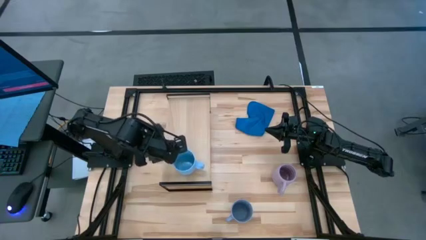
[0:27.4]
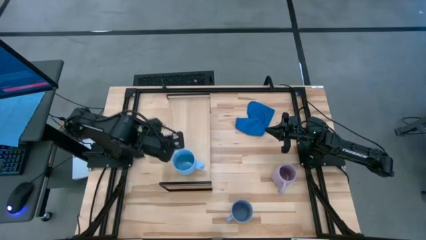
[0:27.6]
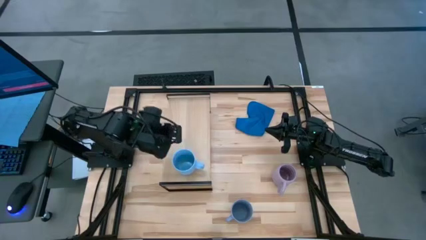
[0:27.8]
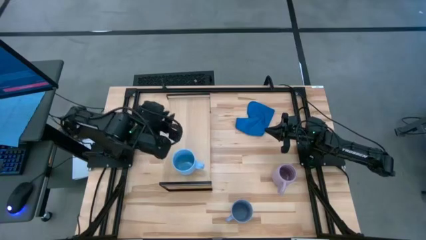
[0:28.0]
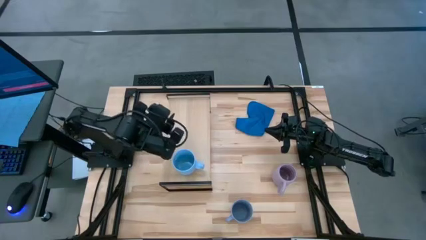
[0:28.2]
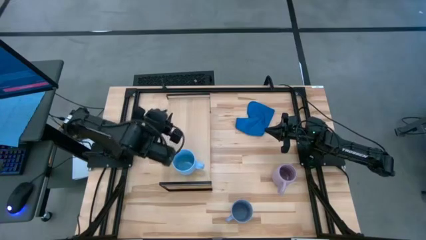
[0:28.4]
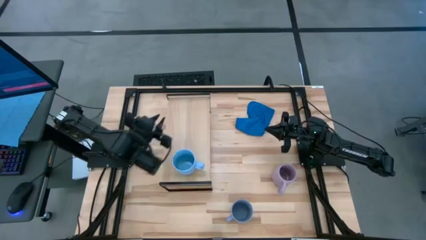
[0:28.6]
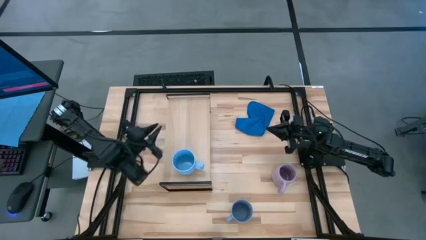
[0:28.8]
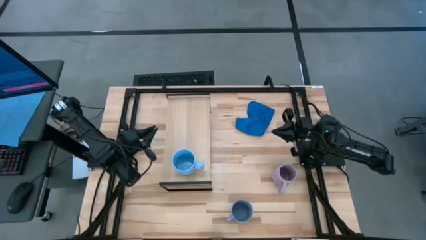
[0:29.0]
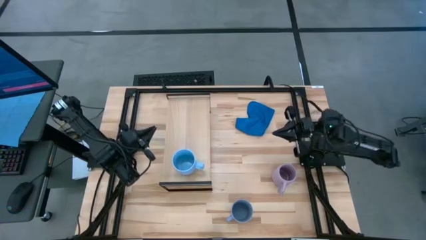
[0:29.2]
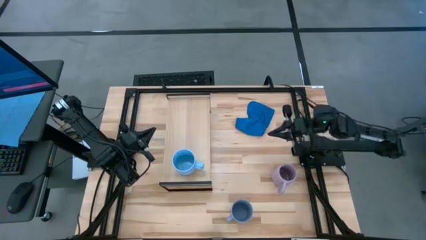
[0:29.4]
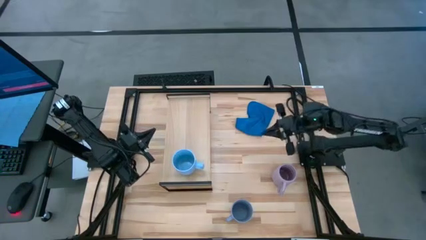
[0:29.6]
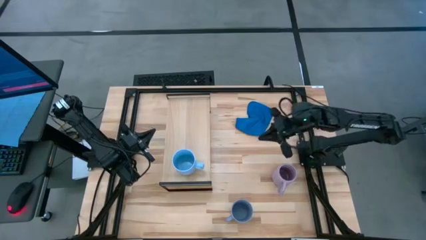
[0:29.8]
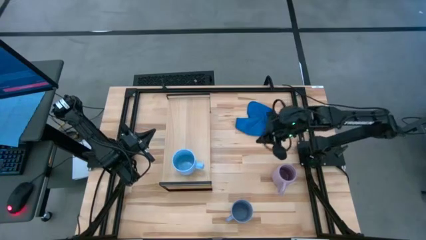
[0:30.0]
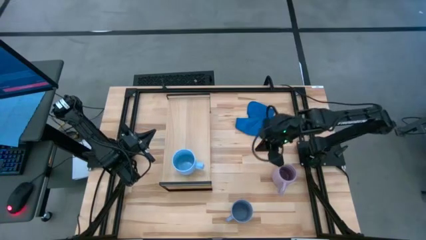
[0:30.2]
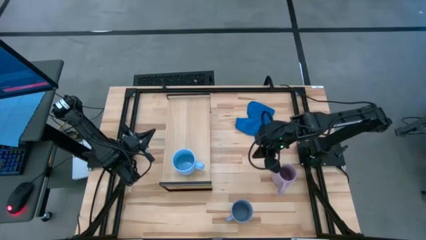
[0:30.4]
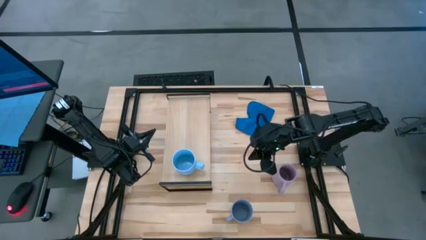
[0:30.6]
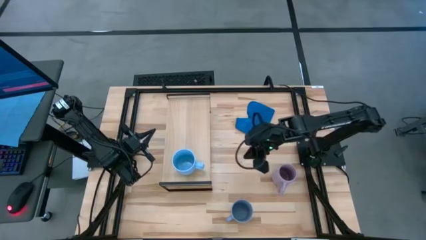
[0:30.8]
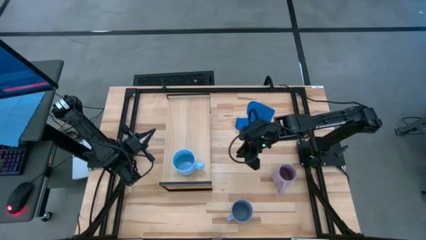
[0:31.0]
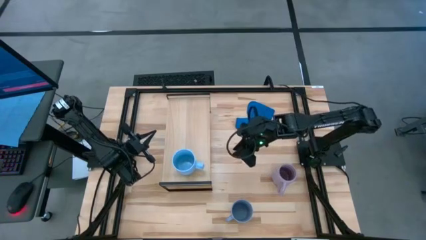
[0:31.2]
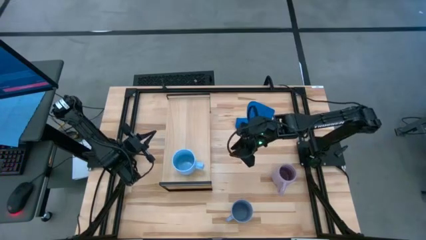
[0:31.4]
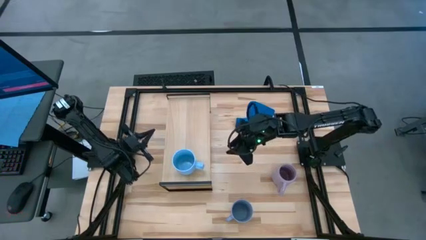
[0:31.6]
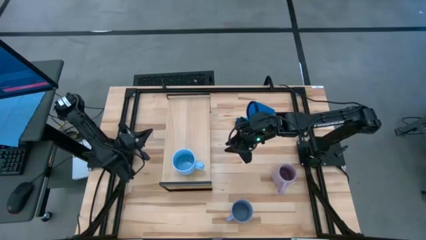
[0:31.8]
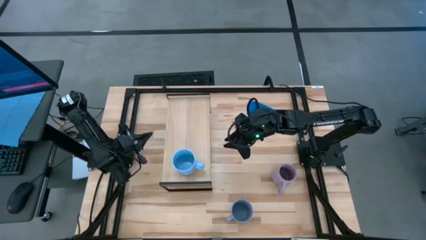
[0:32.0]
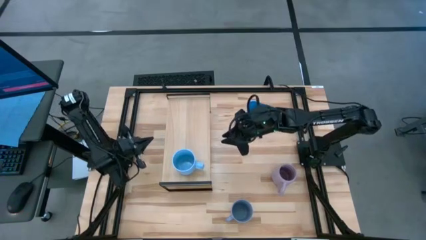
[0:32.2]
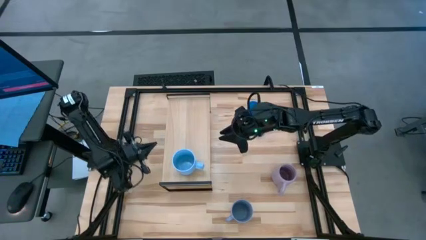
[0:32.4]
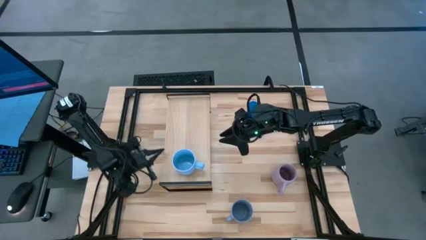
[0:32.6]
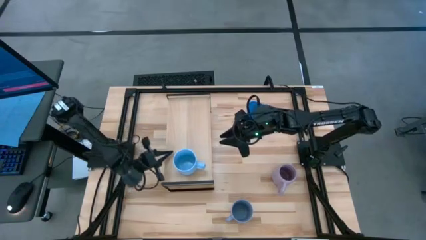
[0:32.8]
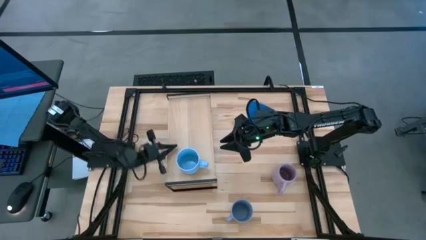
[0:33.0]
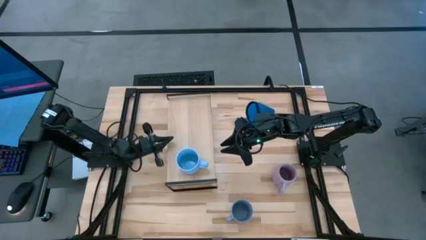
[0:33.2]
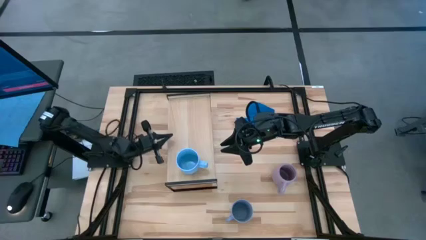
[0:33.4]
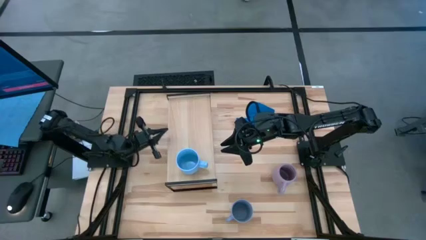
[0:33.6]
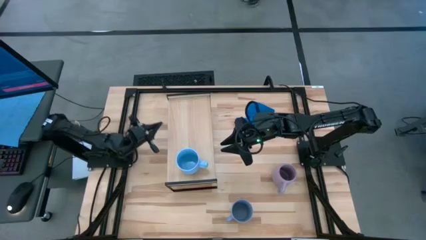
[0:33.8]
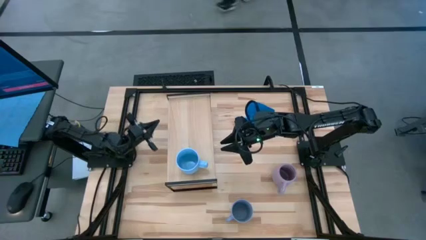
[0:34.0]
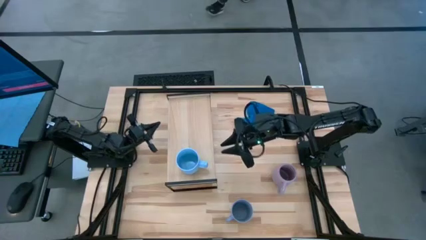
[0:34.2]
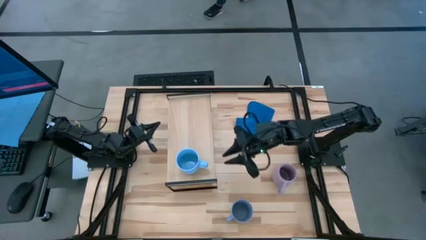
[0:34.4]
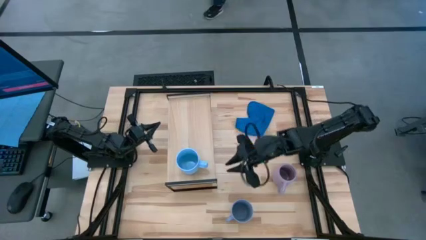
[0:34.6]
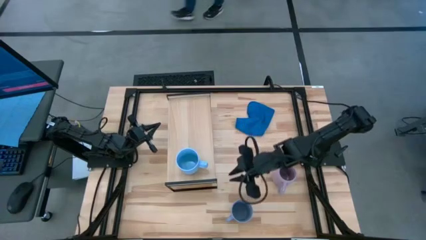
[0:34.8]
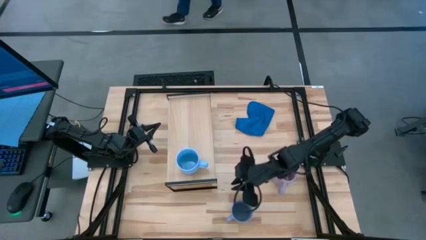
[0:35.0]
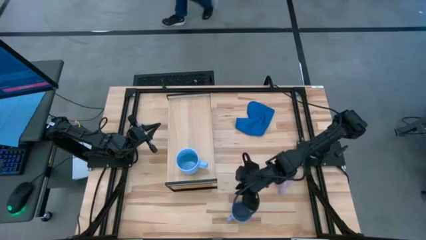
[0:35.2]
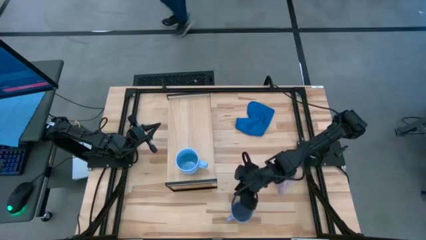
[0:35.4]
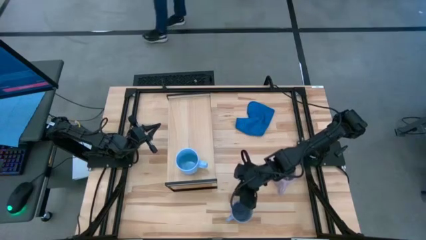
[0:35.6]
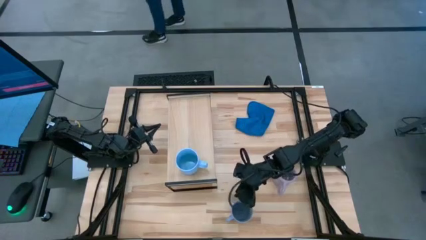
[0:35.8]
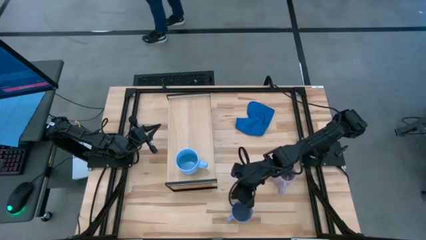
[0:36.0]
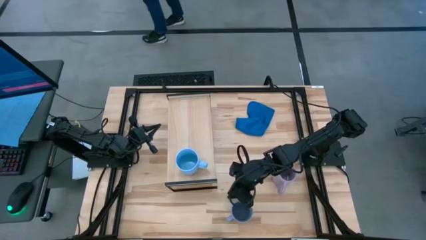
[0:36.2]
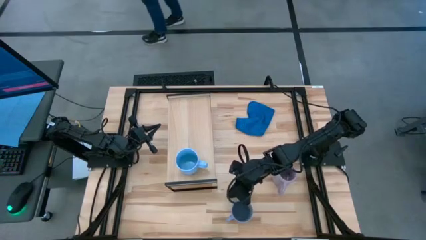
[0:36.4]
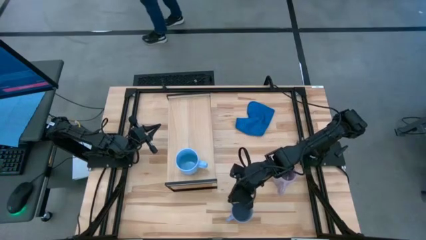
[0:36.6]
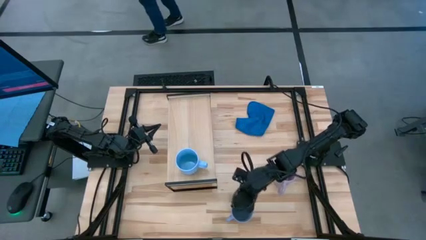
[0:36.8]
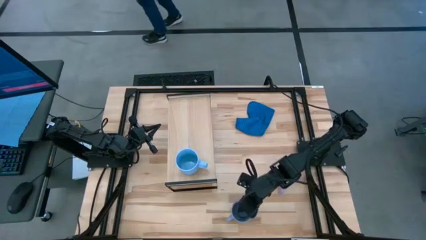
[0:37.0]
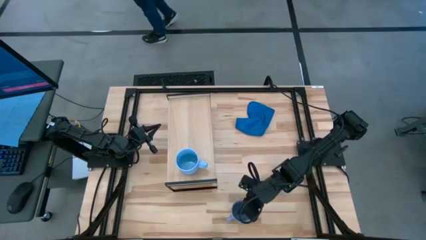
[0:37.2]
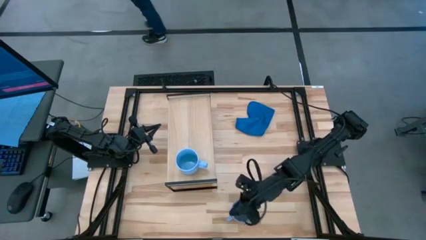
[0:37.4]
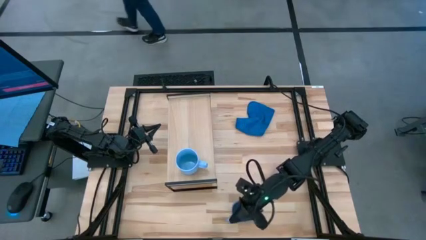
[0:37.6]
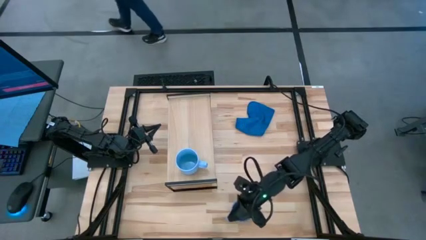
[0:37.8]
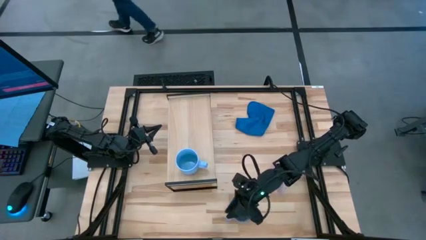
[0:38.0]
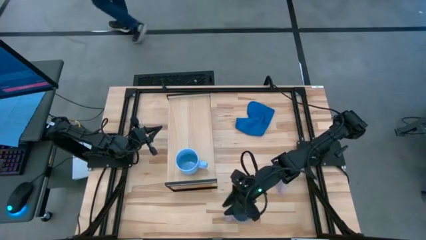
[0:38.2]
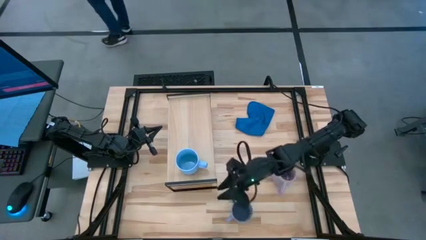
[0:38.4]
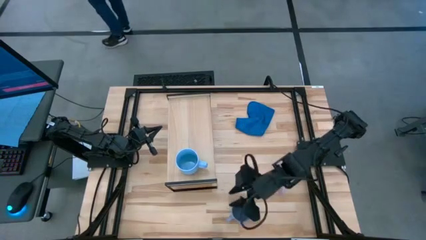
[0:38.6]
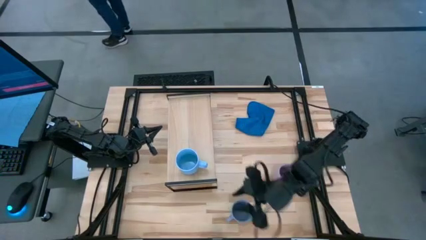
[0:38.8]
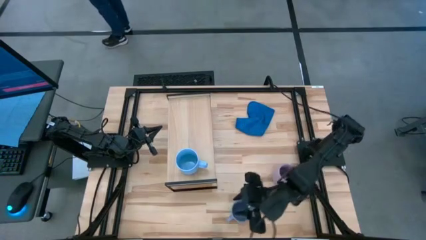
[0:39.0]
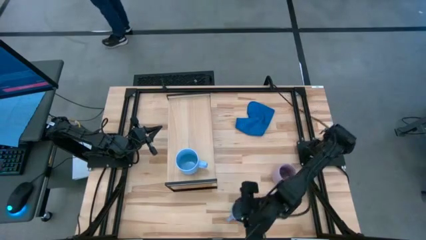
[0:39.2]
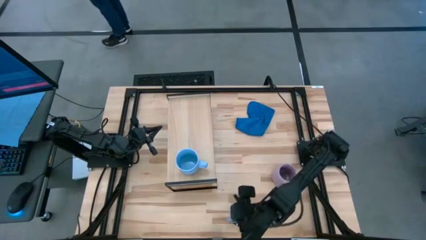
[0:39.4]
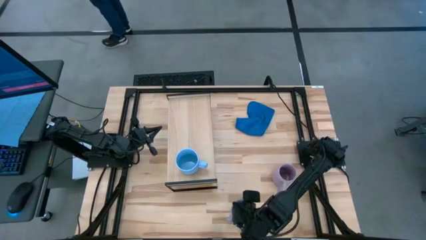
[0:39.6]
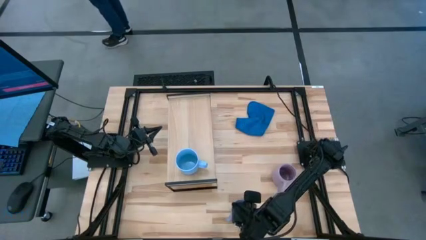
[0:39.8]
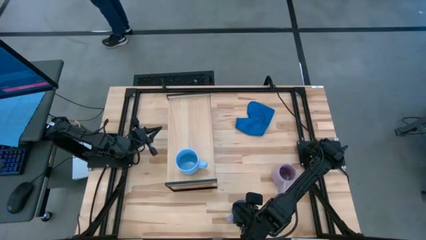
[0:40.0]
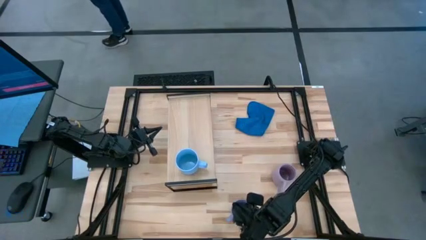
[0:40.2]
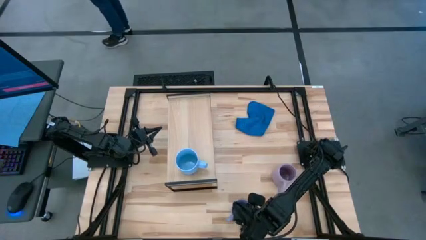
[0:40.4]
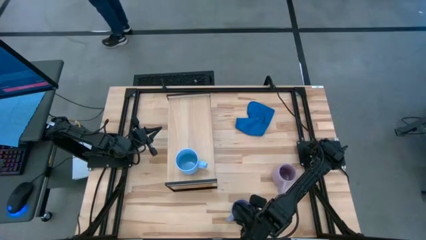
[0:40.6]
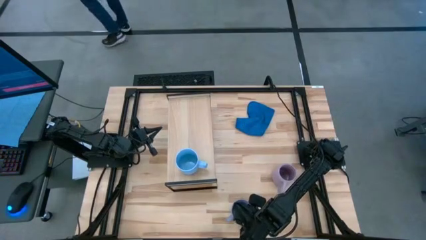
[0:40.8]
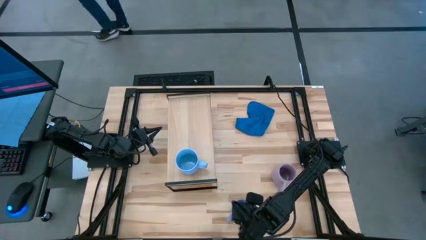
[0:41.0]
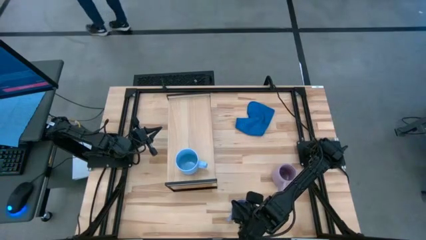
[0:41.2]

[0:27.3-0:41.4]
Task: Stack small to large cups/mugs on shelf
Put the blue mug on the shelf
